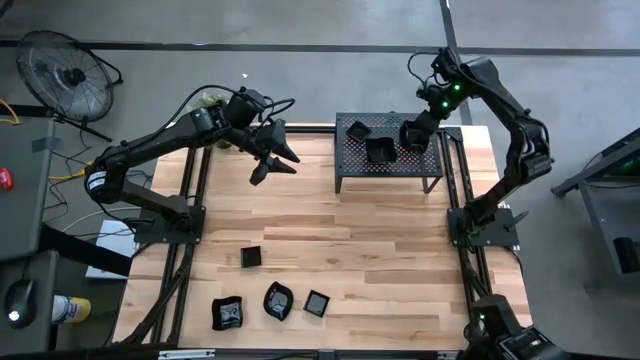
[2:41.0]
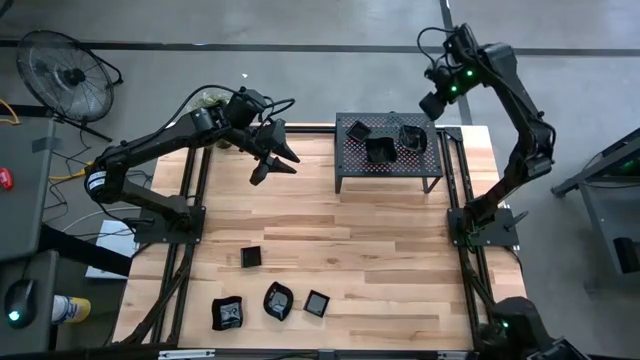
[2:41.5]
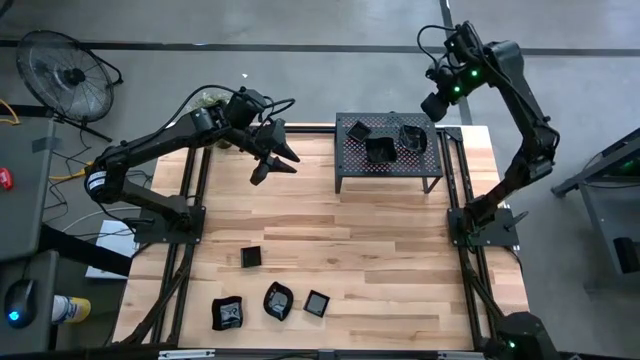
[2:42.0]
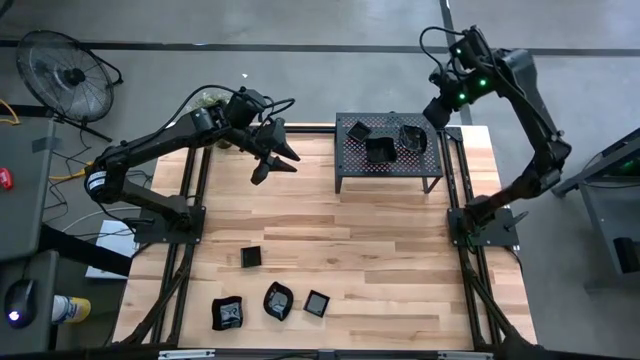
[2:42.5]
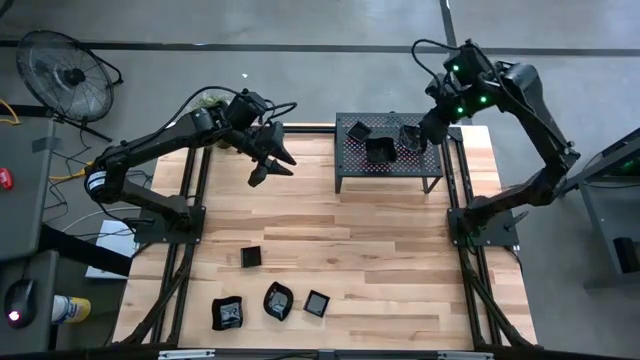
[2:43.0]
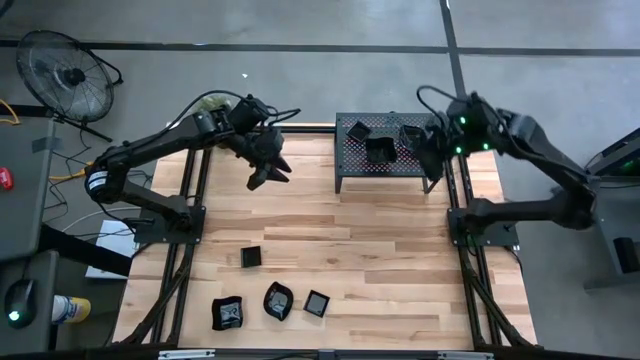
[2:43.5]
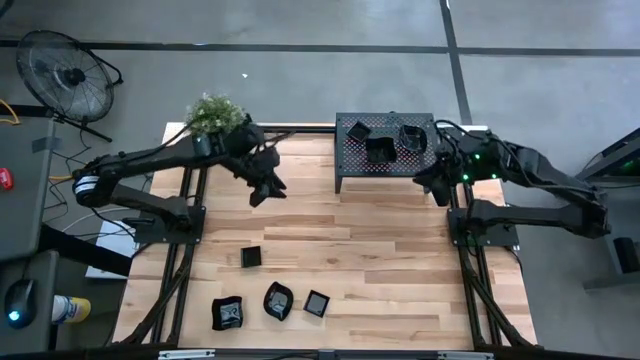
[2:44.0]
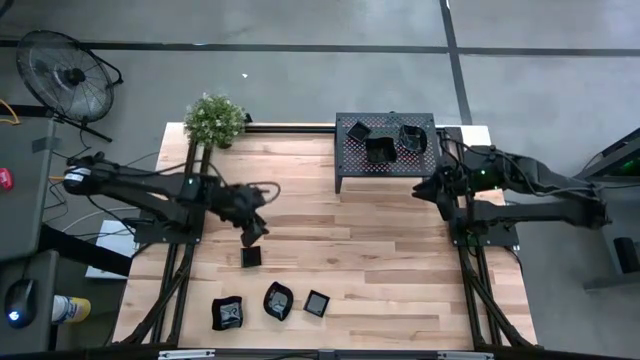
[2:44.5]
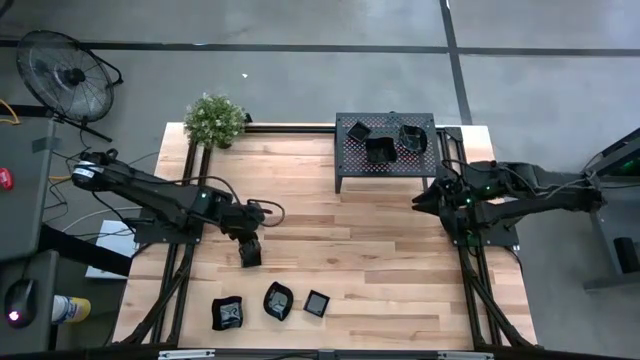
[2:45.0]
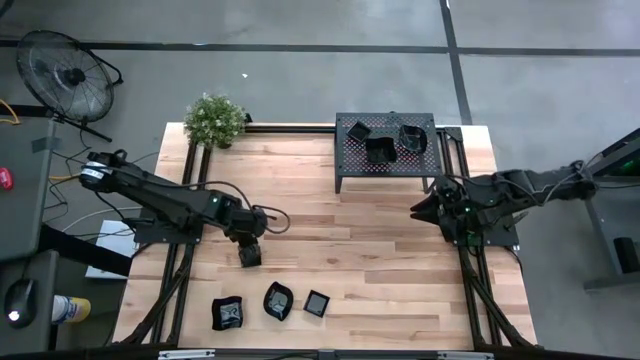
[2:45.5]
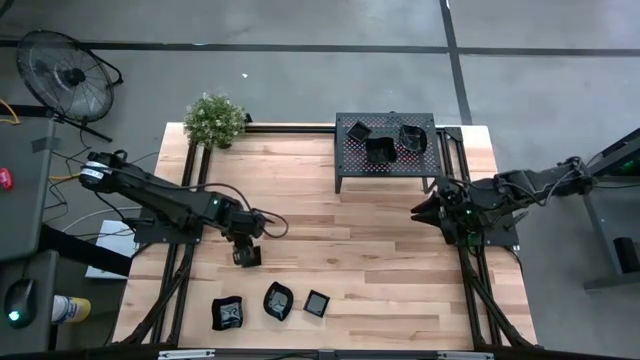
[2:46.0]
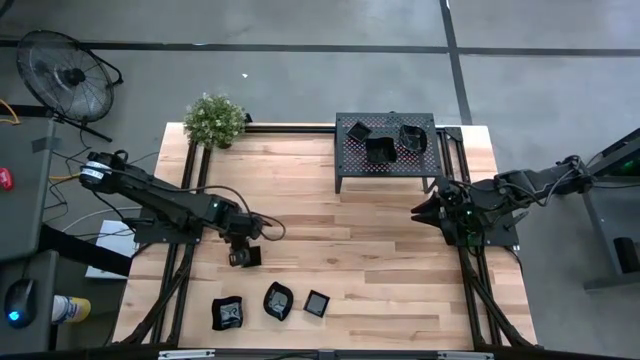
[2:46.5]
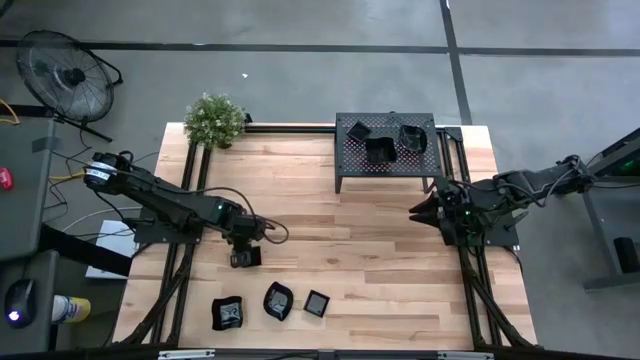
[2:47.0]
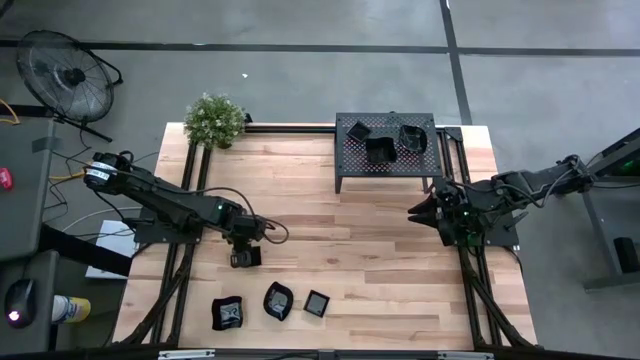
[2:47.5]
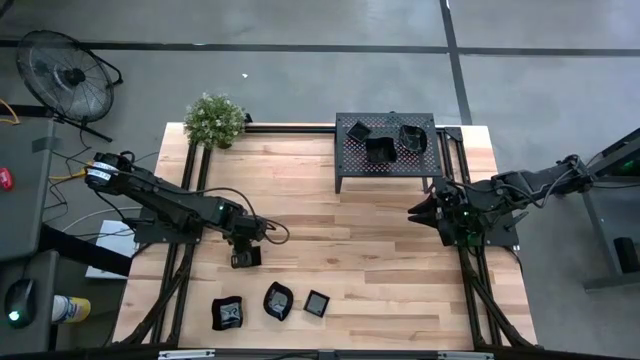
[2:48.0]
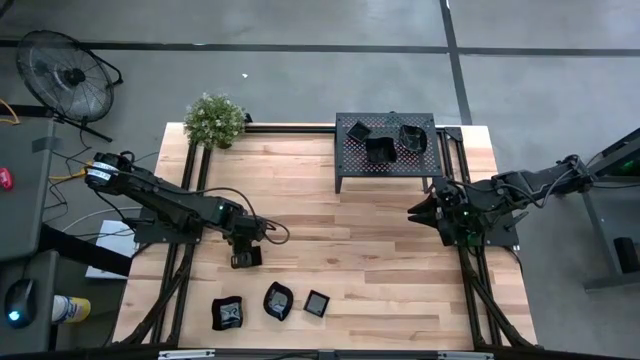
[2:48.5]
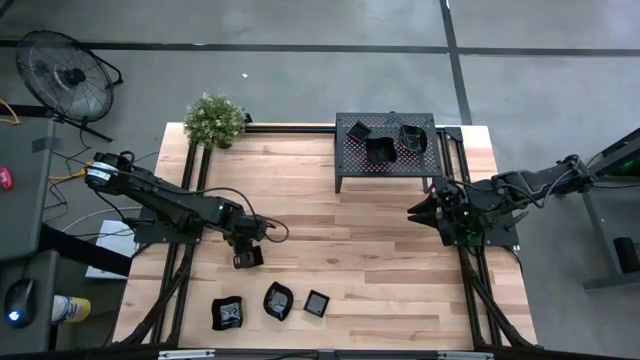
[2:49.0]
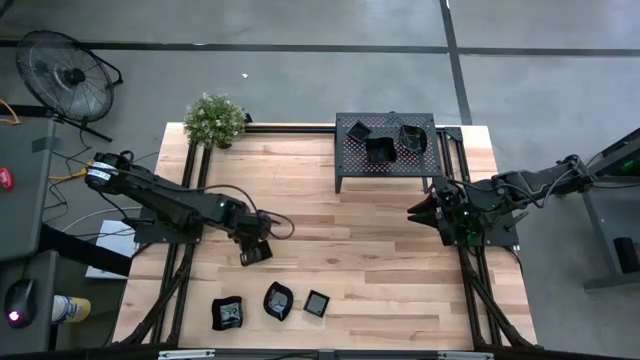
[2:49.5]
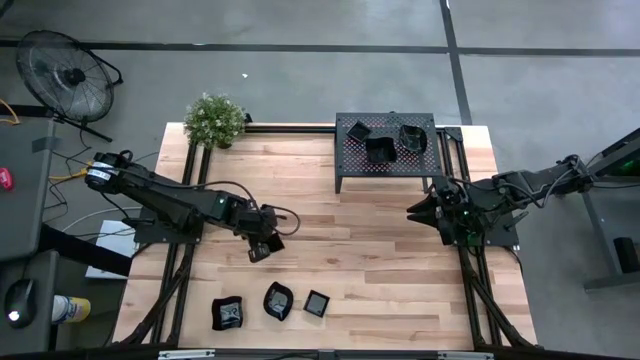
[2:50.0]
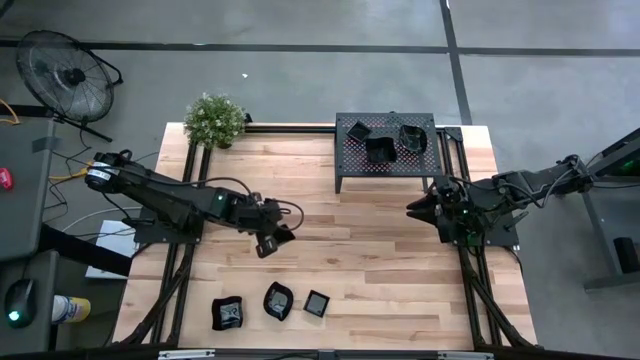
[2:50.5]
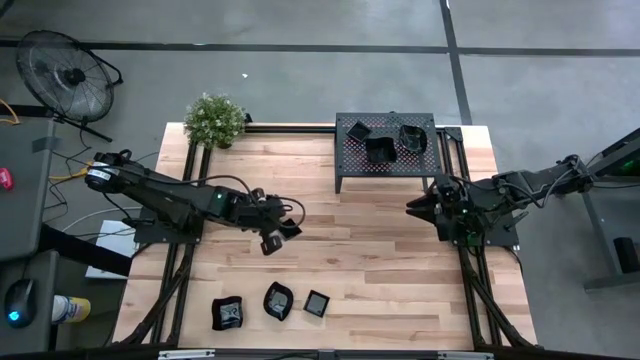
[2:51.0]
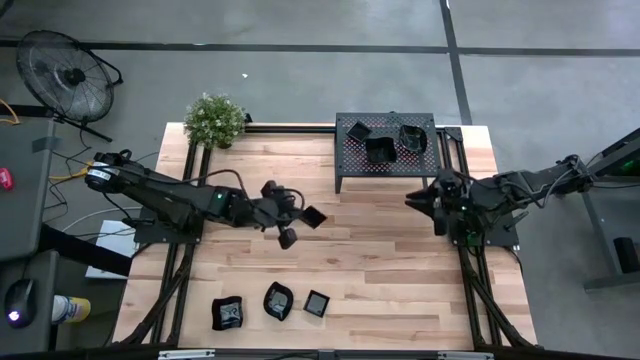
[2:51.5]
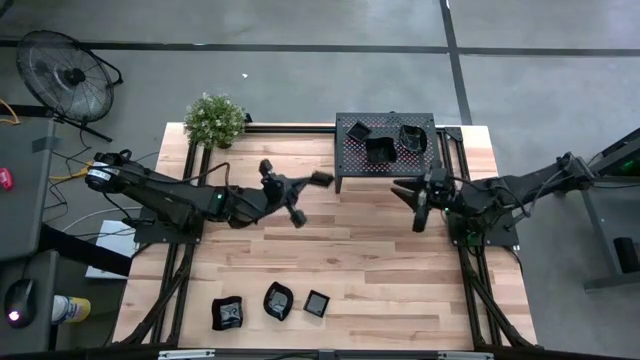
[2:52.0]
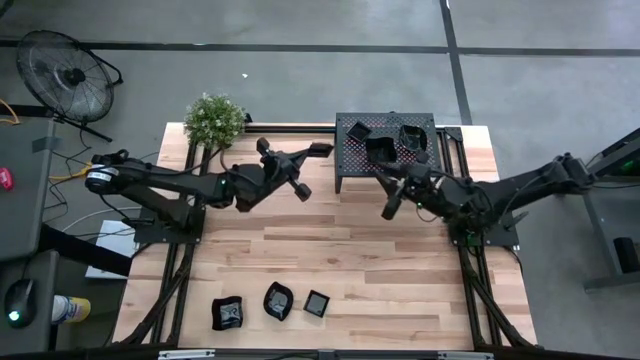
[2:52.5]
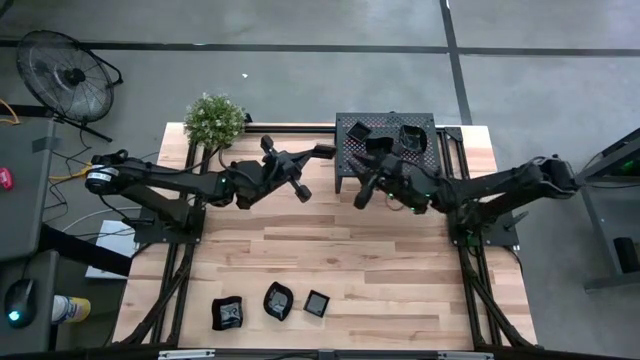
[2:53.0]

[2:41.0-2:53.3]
Task: Pick & Place Mini shaped plates
Stack the black square plate on top of the black square plates on the shelf
